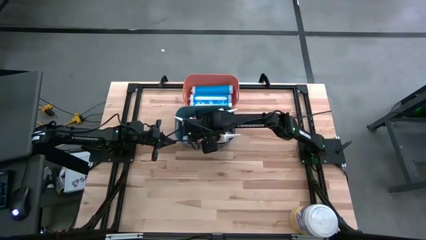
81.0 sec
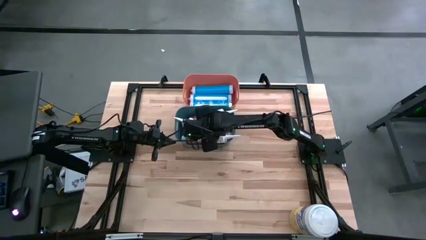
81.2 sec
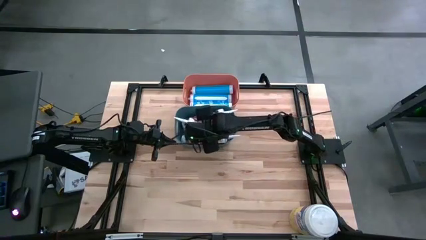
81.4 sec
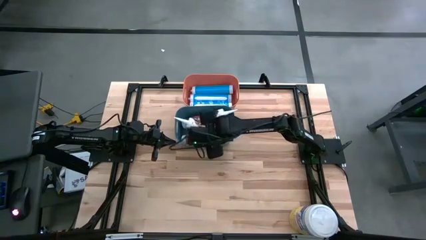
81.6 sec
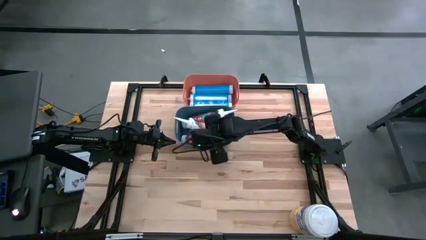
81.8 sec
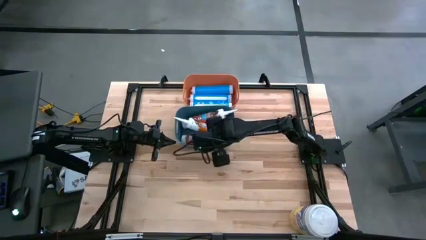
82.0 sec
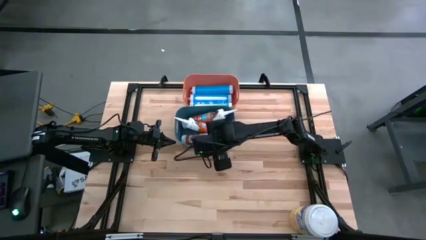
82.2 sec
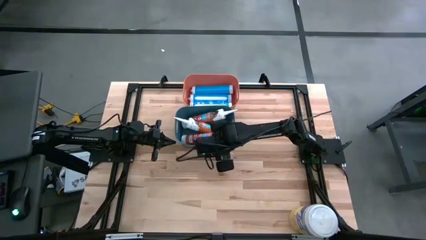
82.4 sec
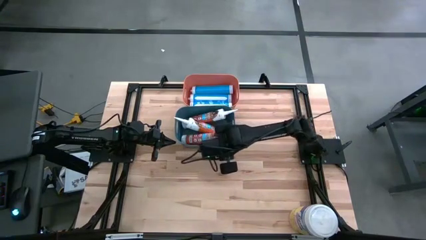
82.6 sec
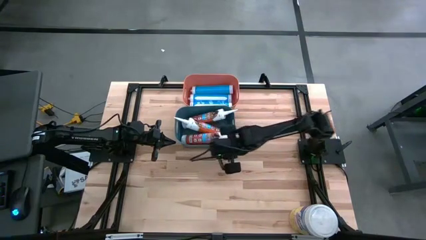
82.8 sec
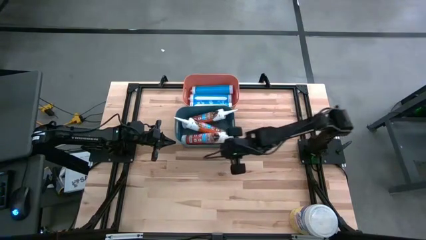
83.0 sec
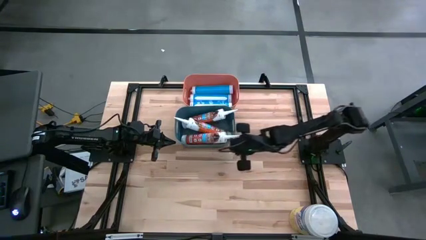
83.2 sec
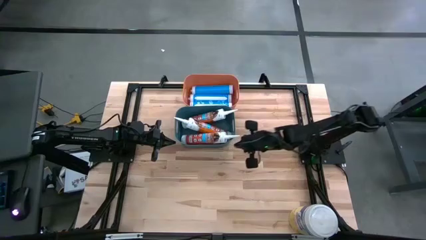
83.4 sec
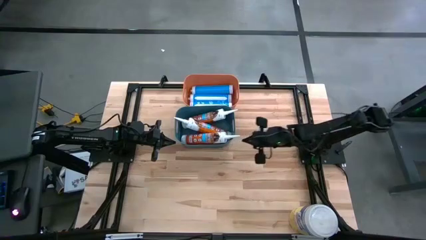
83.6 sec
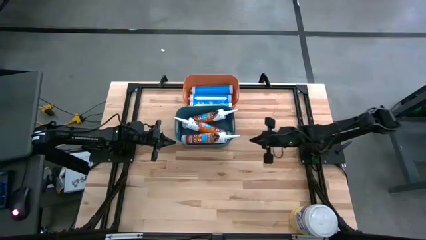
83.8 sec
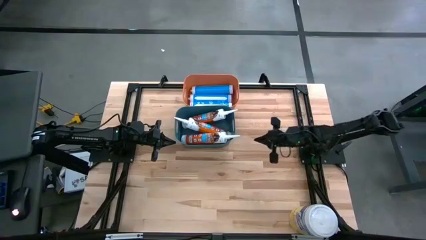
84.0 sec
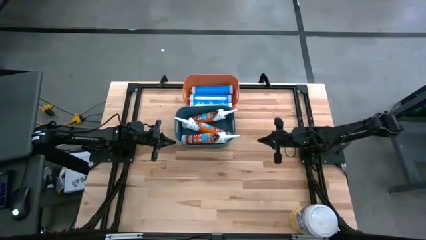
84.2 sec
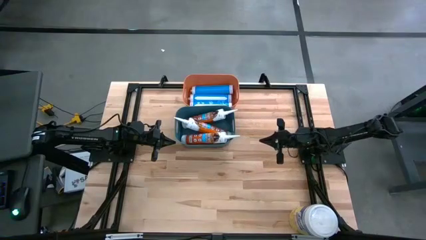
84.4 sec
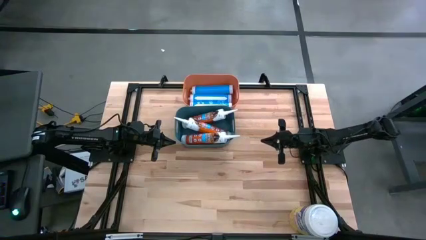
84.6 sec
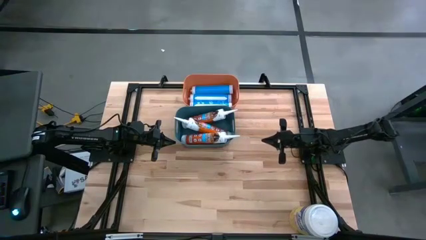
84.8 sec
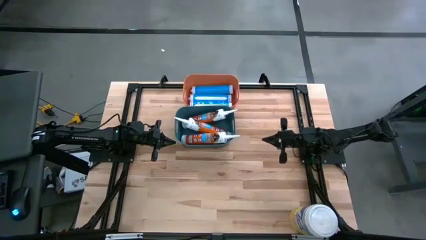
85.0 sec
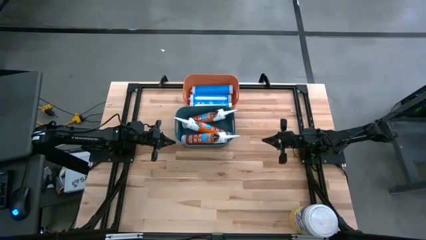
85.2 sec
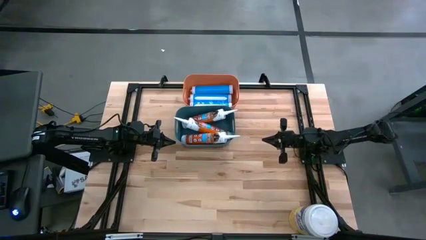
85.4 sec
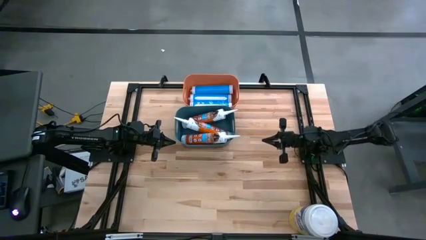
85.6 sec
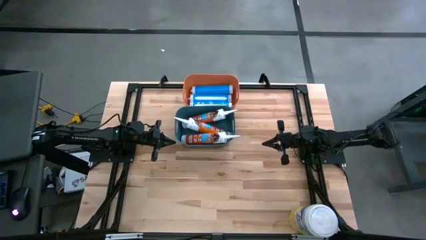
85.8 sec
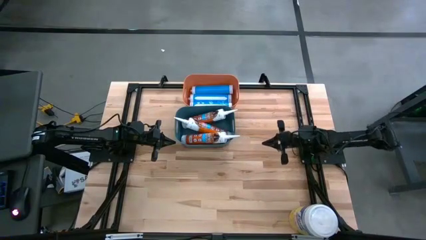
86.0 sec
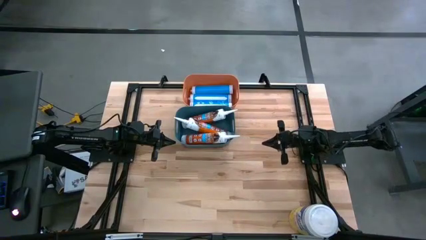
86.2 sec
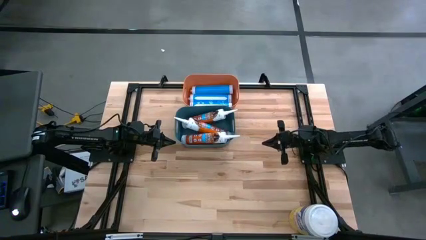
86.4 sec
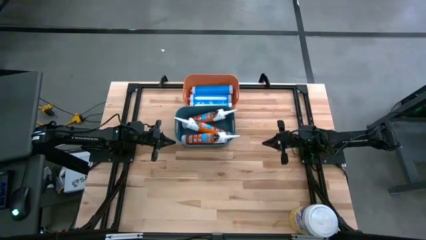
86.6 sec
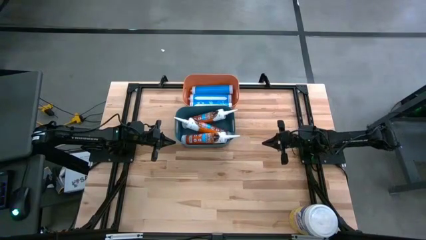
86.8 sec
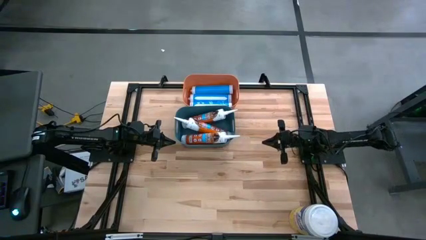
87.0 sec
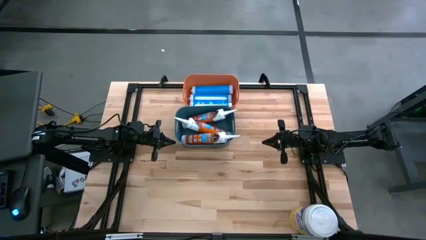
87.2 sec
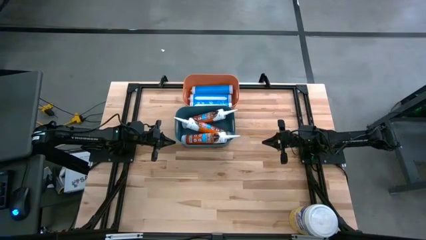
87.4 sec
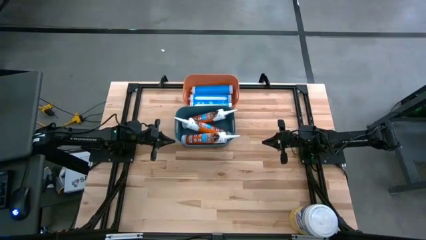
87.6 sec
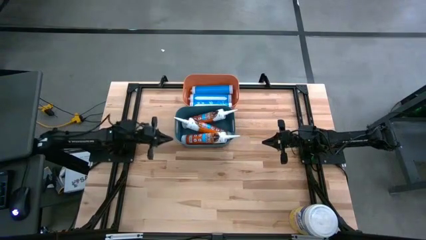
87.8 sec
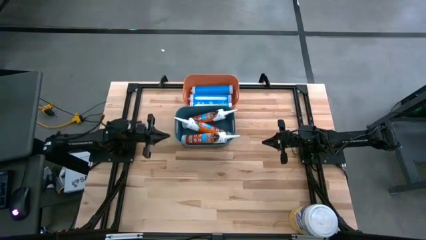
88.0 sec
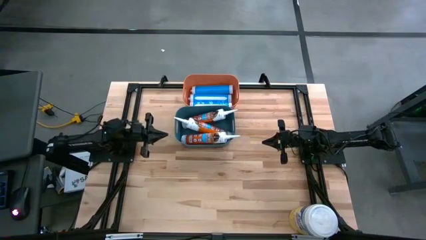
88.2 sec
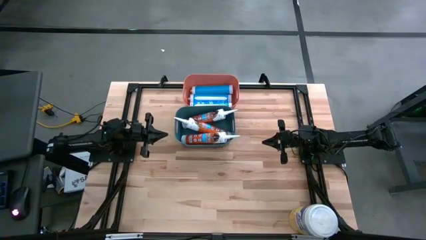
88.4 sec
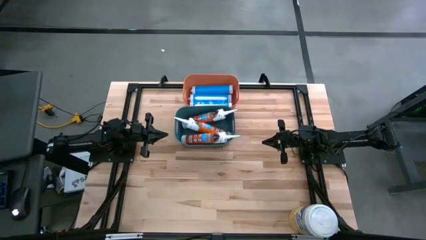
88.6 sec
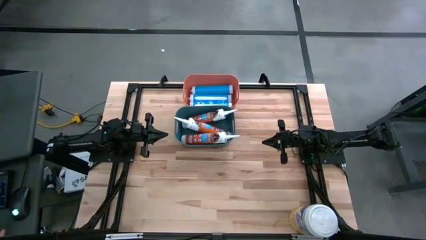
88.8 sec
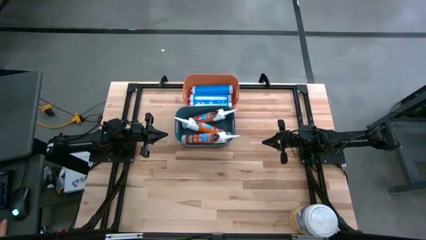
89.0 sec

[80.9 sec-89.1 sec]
Task: Pick & place silicon tubes, Sealant and Lysol wipes
Return to Home Position

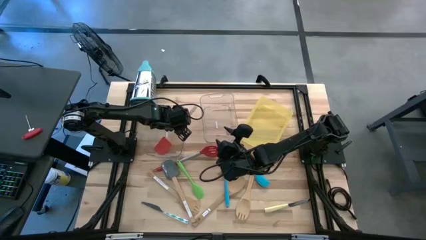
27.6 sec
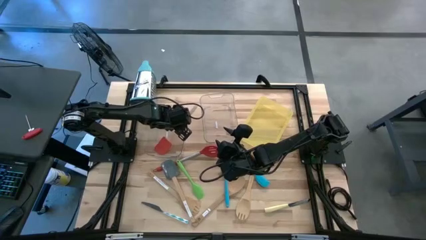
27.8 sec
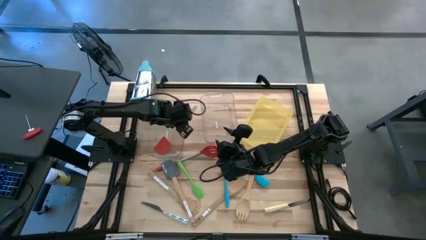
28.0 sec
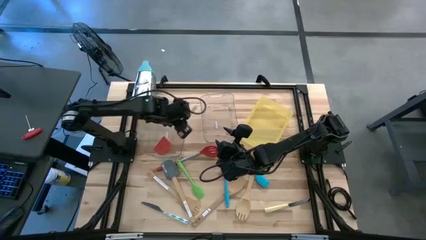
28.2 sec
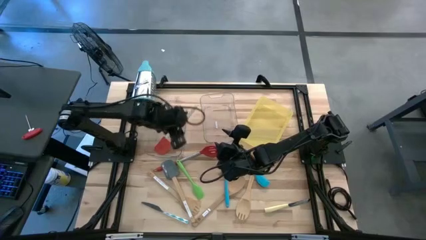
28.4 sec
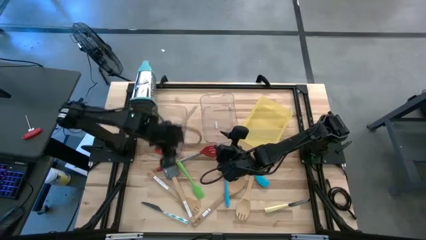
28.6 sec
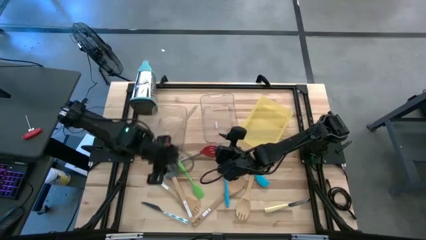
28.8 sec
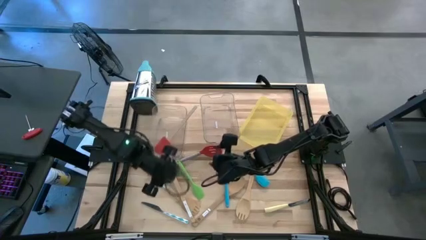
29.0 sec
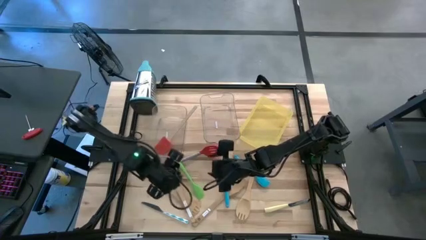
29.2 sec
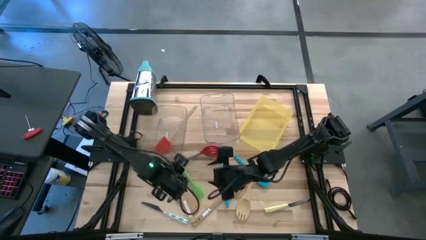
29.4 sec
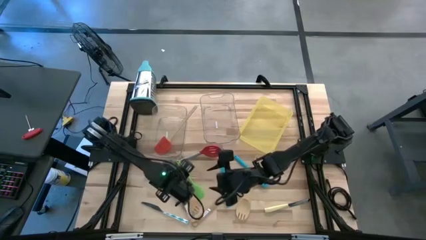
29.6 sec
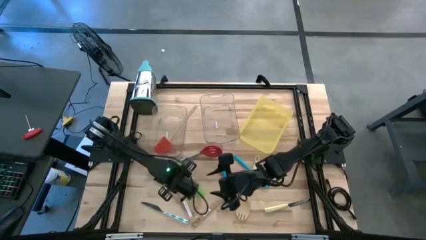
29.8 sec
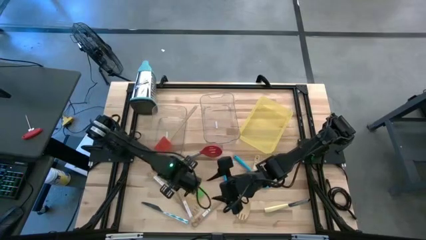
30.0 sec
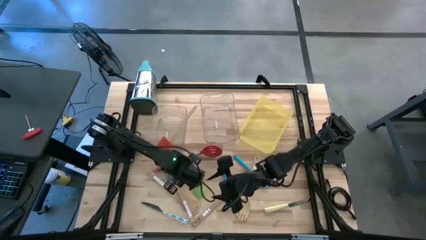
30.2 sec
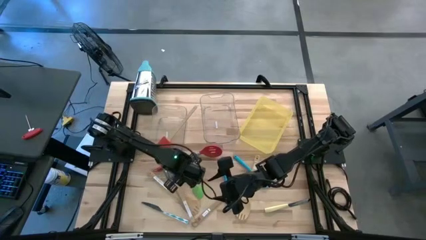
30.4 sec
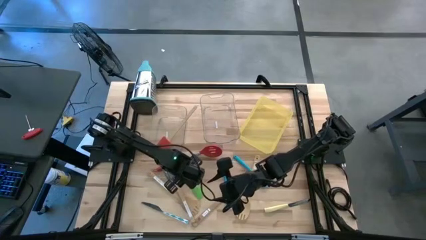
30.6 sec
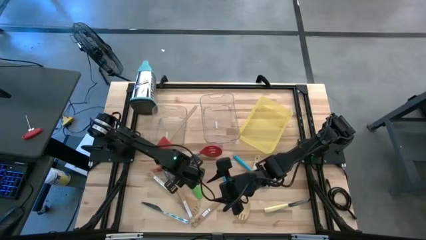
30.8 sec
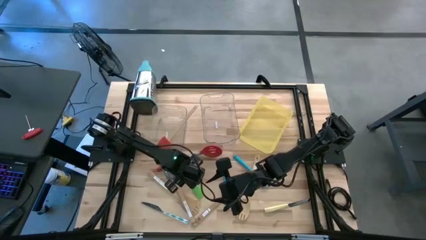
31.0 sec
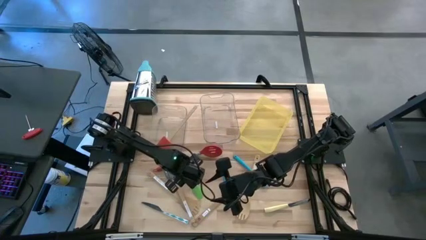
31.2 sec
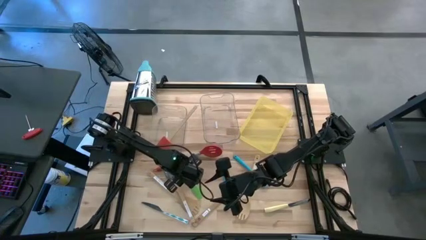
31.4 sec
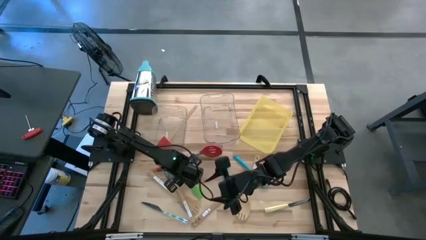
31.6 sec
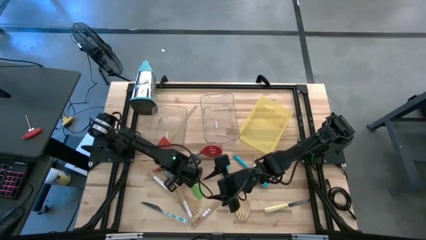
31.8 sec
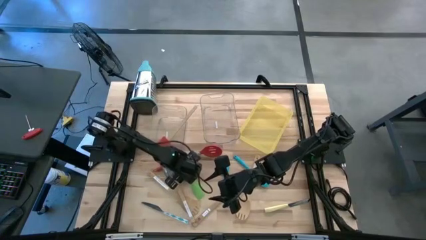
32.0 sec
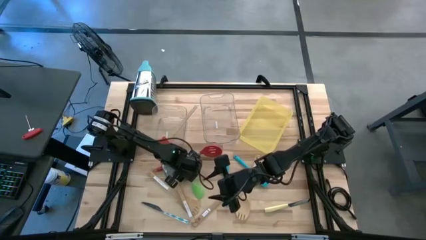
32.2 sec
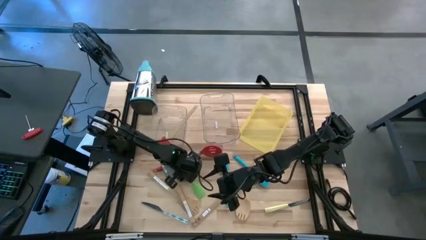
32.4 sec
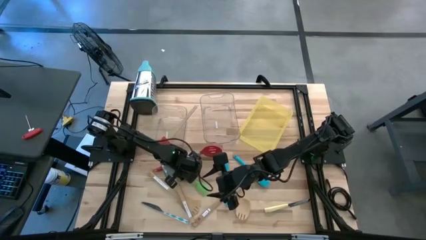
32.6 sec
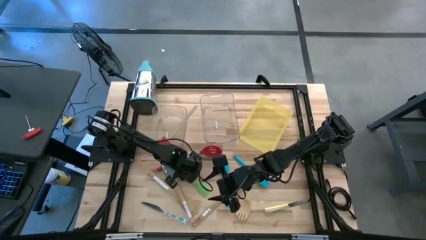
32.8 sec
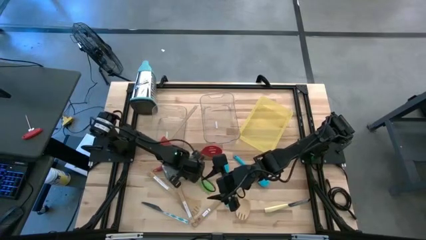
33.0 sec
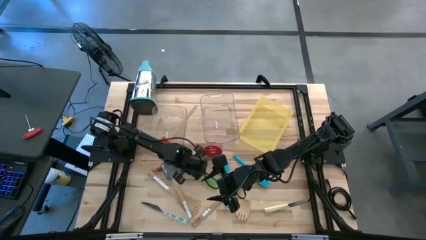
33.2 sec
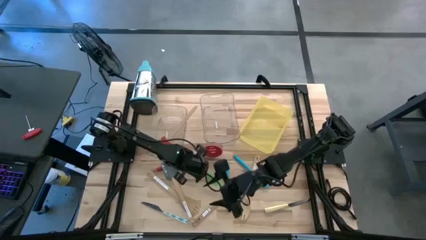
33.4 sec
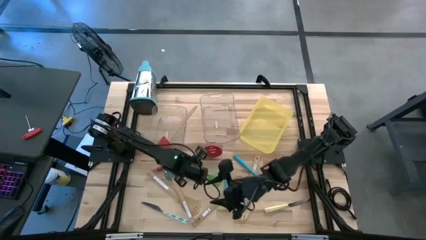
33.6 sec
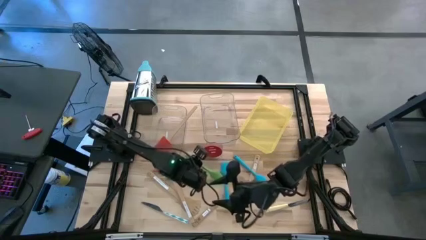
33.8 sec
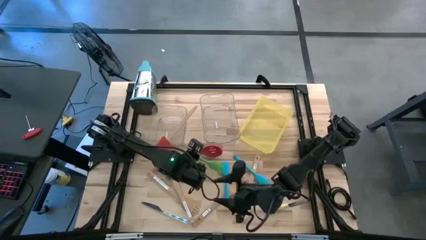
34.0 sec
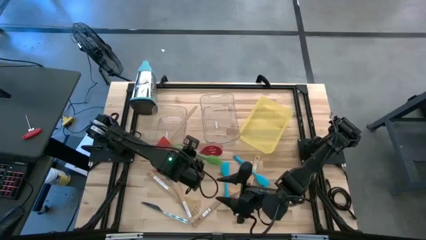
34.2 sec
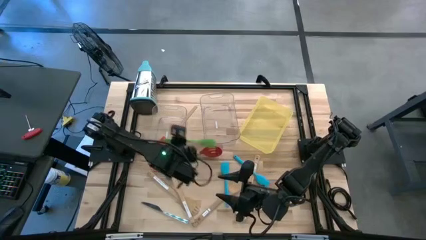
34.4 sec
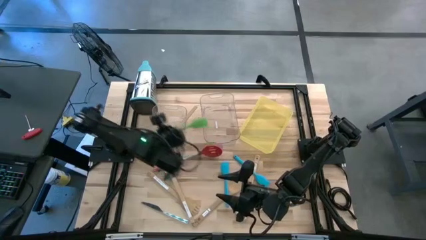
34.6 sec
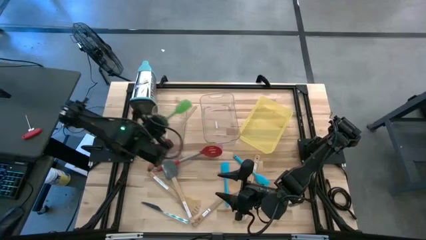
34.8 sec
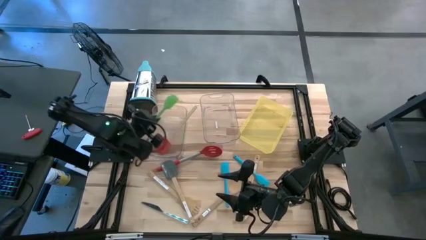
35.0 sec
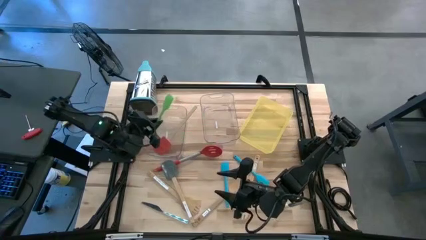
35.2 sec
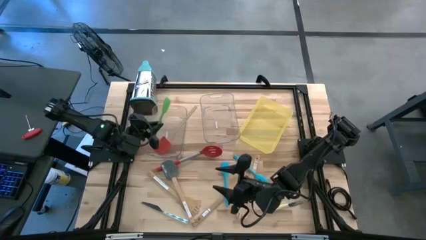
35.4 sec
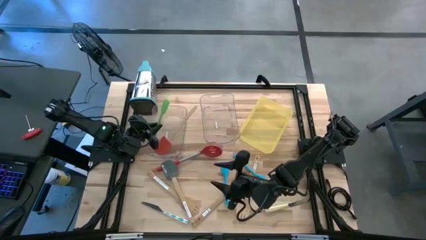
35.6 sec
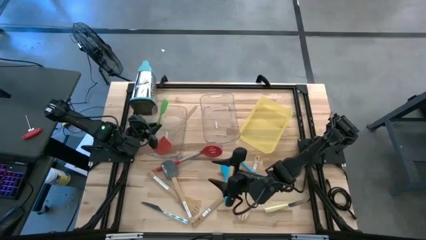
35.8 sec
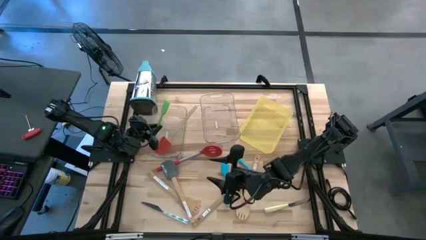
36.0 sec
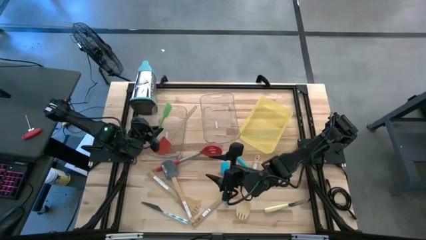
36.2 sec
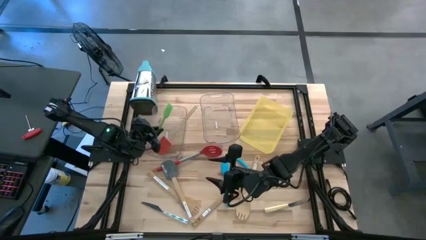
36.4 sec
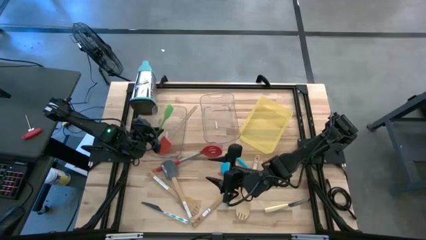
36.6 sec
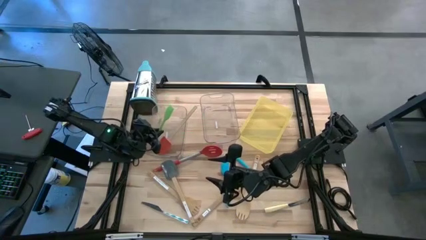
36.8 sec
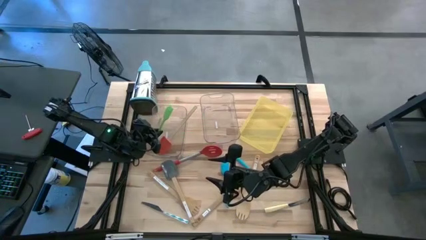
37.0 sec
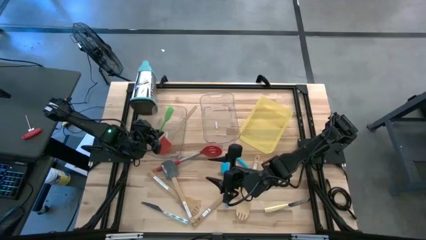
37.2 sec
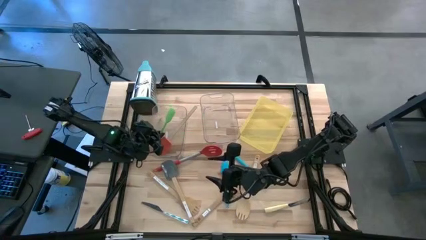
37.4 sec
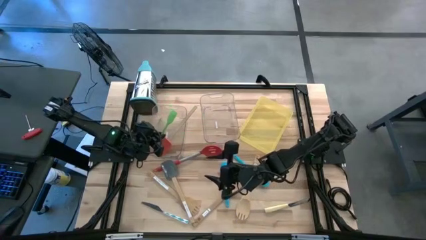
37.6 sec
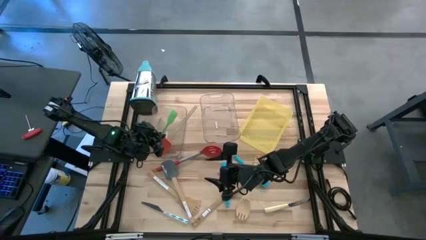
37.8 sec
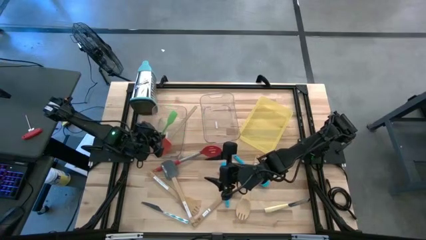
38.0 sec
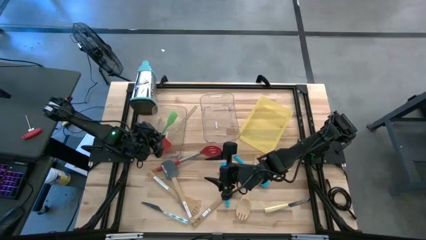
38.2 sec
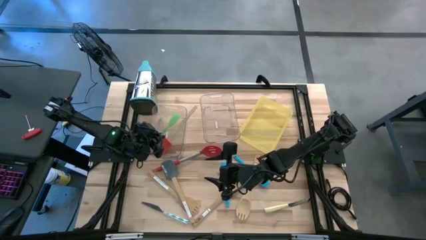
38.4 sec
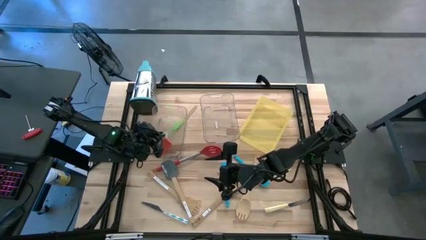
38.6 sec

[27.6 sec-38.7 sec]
Task: Pick & Place Kitchen Items
Put the green spatula into the left transparent bin
